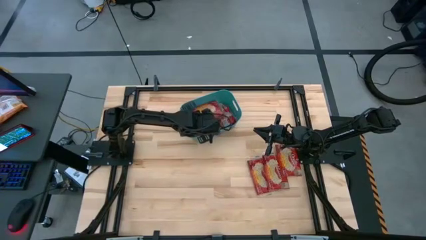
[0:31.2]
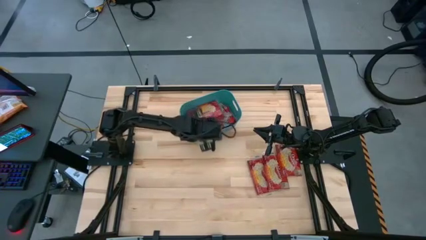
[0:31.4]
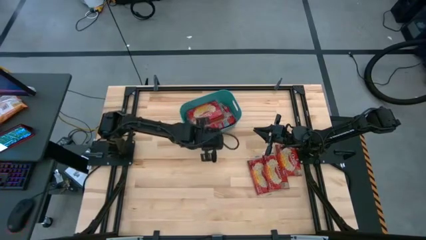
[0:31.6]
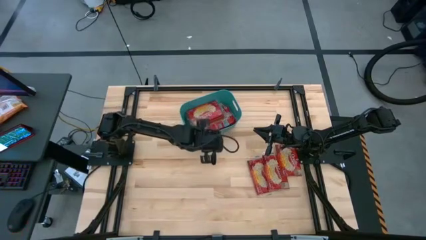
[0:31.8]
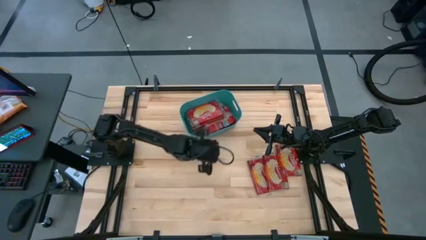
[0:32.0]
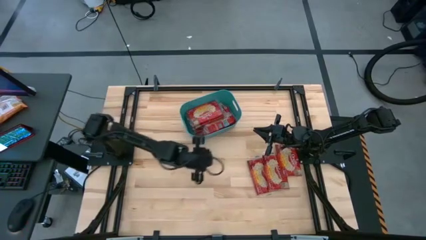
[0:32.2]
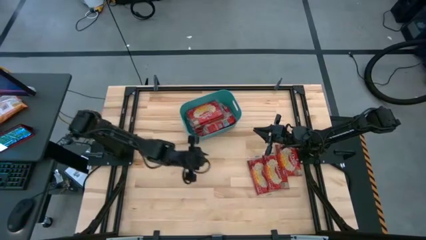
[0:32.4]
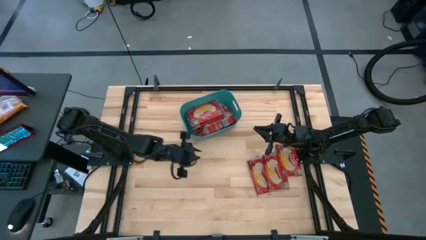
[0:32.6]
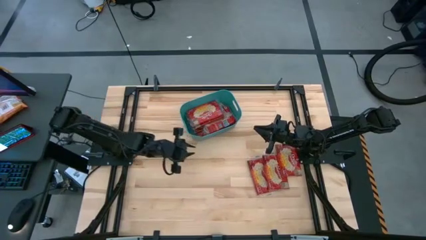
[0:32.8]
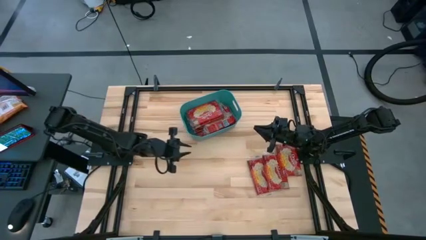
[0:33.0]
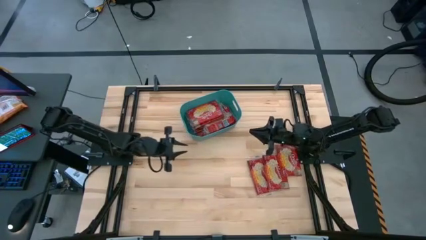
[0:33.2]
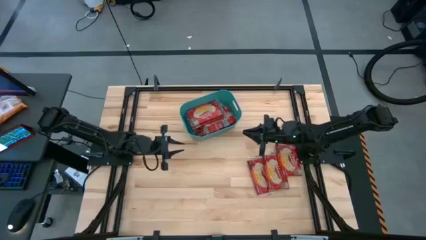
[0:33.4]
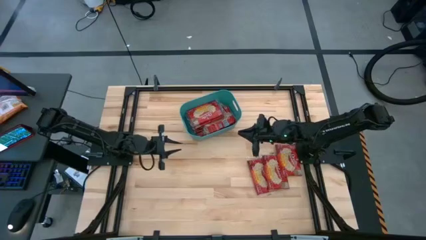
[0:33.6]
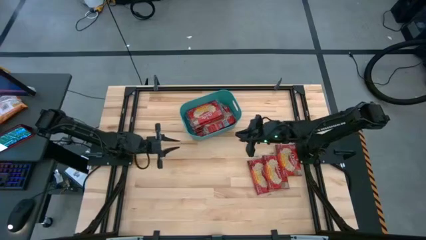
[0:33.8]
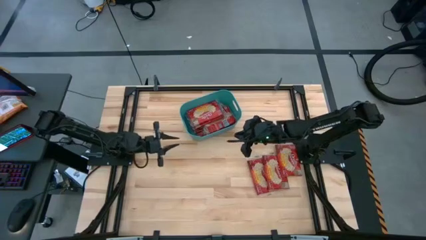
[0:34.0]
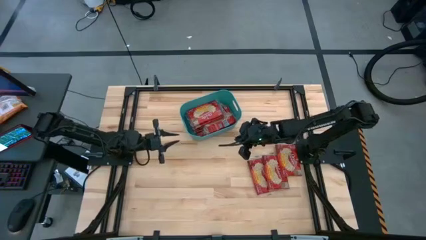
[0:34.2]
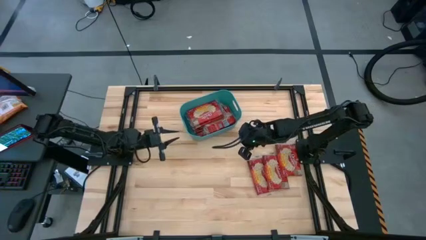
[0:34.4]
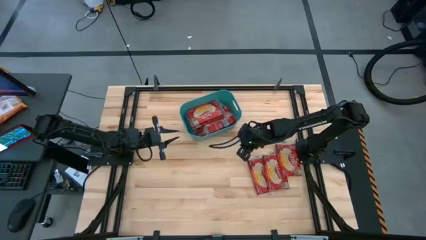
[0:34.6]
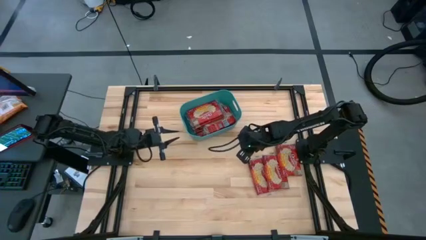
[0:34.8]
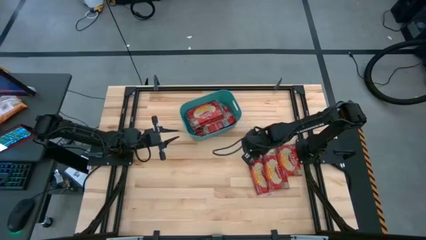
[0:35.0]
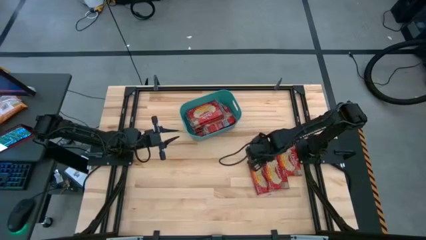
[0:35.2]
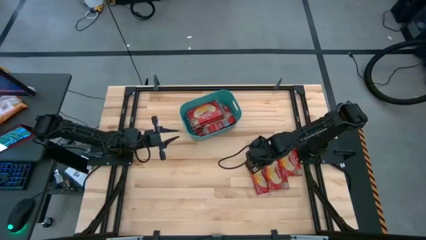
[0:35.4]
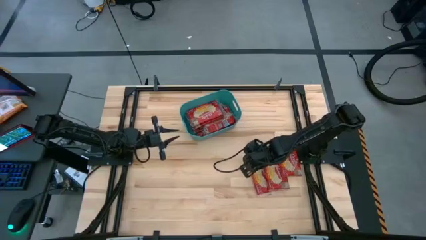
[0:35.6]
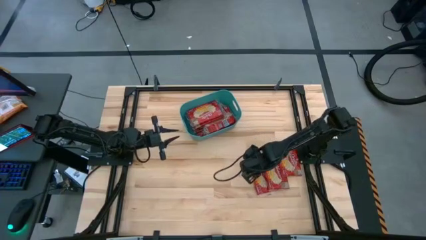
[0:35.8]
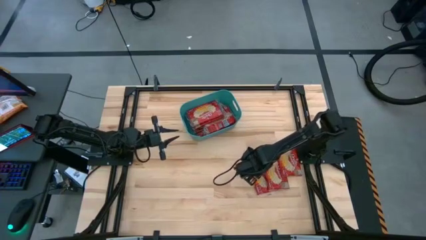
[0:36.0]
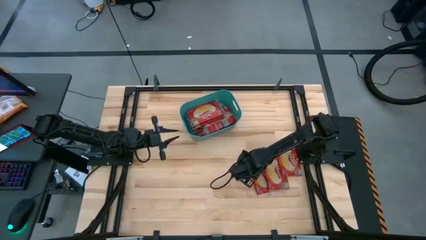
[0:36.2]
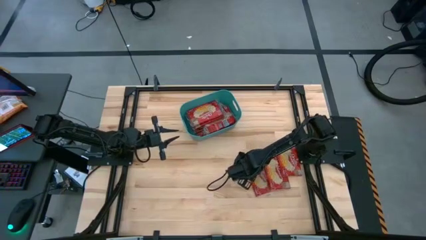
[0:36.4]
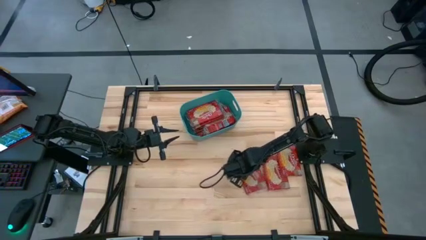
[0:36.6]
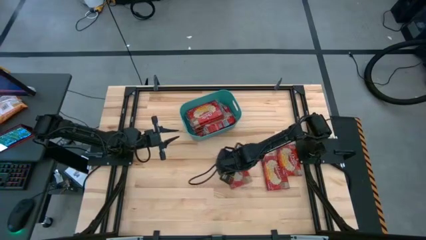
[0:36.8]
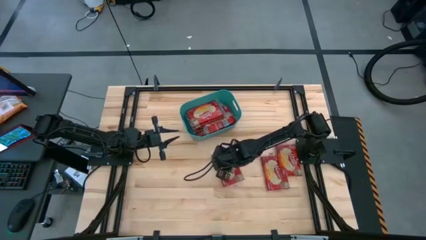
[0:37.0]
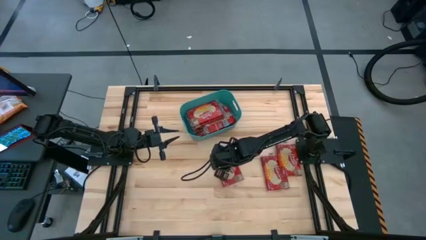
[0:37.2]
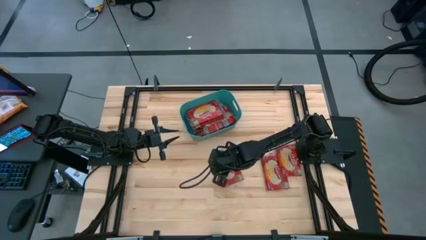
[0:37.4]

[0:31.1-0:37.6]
Task: Sort popcorn bags into baskets
Move the red popcorn bag to the center

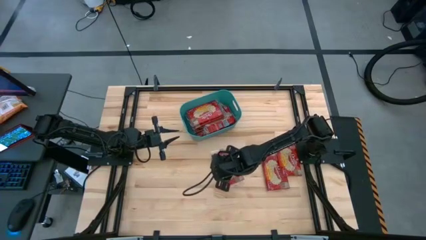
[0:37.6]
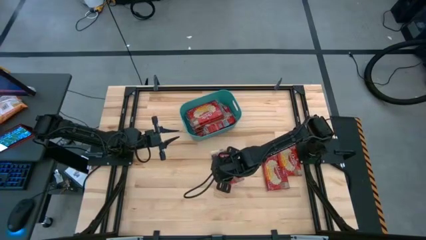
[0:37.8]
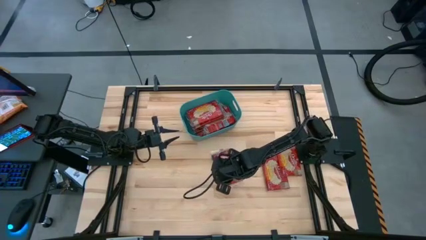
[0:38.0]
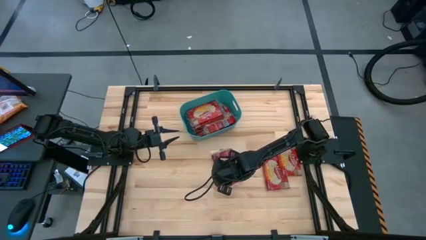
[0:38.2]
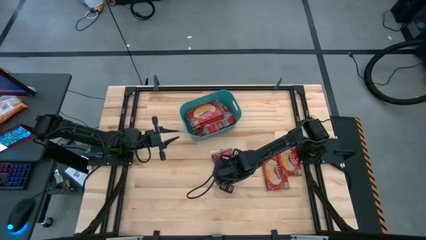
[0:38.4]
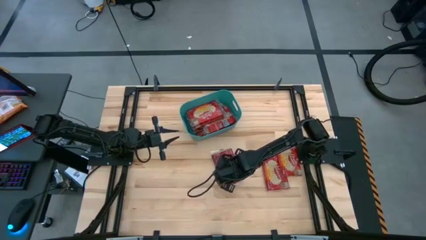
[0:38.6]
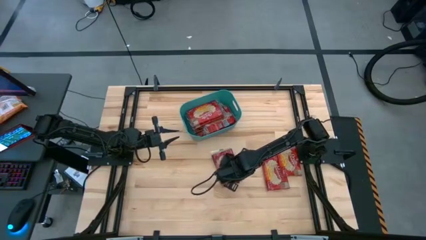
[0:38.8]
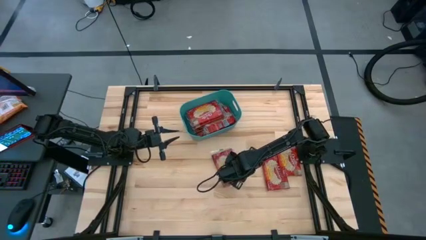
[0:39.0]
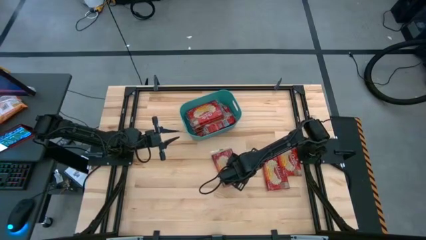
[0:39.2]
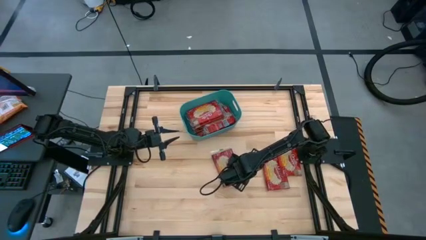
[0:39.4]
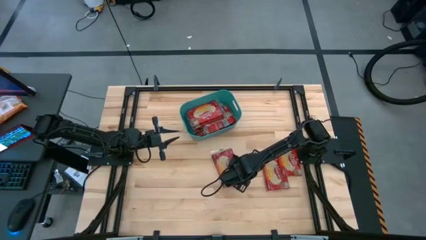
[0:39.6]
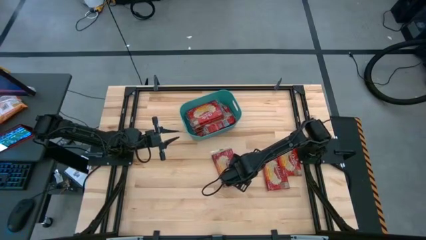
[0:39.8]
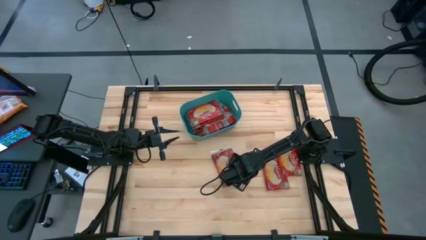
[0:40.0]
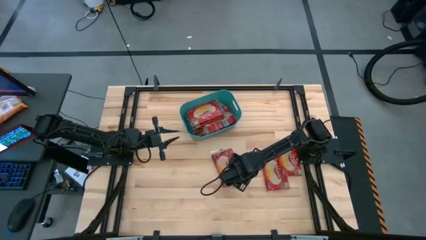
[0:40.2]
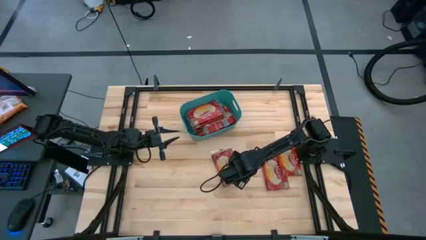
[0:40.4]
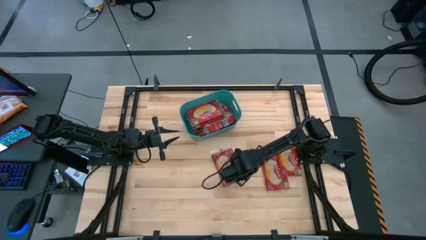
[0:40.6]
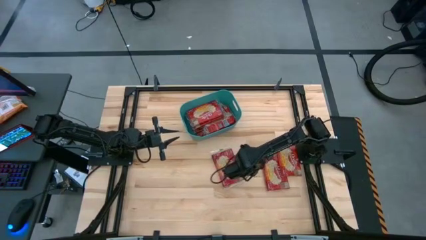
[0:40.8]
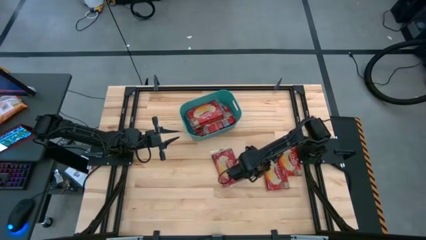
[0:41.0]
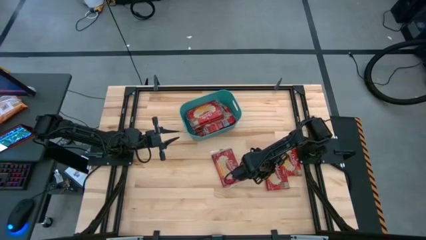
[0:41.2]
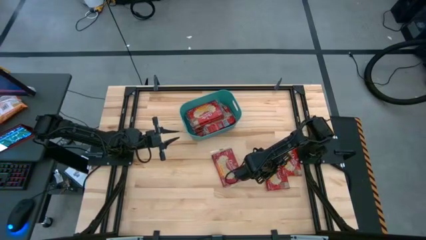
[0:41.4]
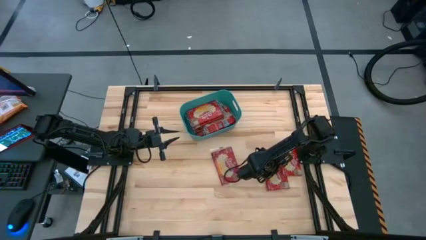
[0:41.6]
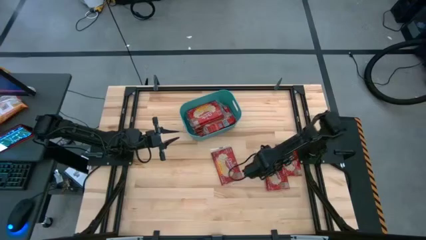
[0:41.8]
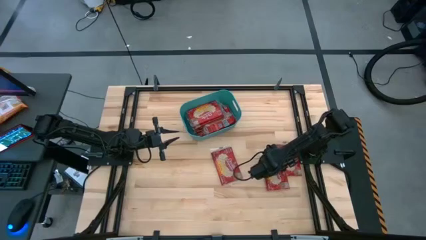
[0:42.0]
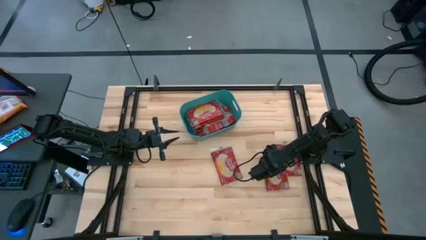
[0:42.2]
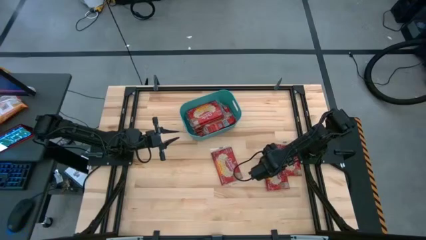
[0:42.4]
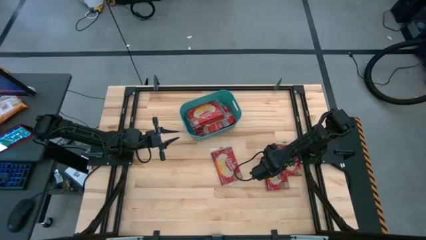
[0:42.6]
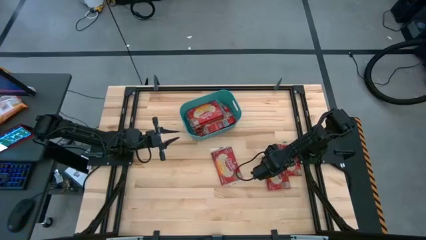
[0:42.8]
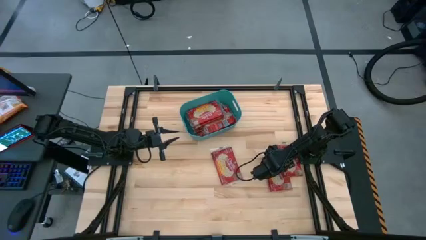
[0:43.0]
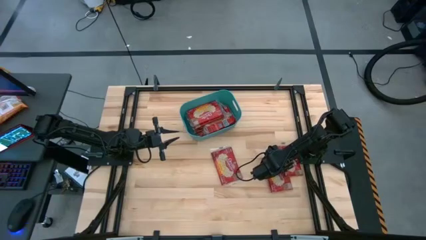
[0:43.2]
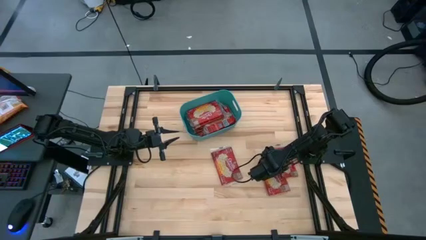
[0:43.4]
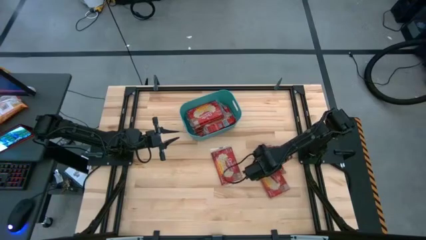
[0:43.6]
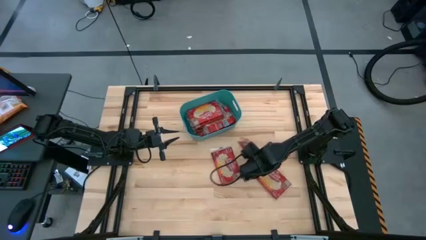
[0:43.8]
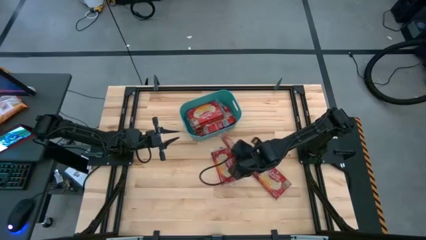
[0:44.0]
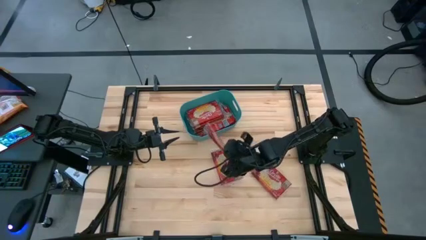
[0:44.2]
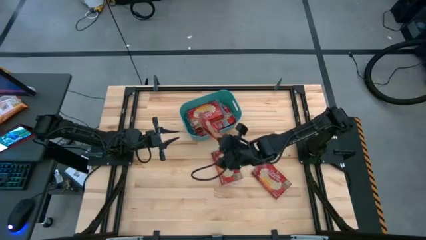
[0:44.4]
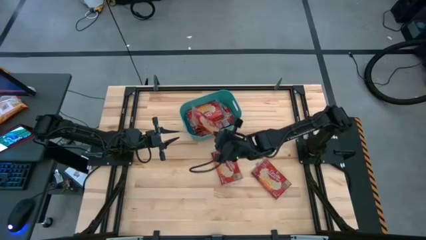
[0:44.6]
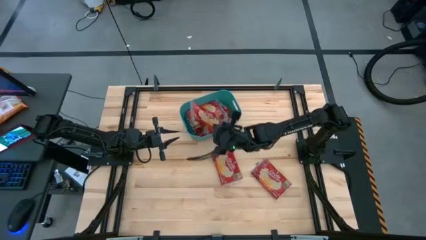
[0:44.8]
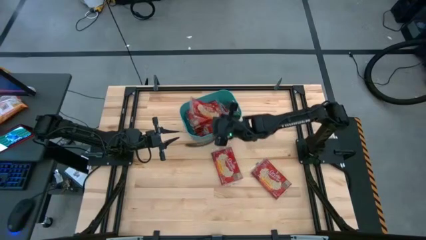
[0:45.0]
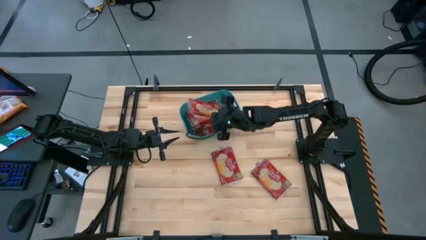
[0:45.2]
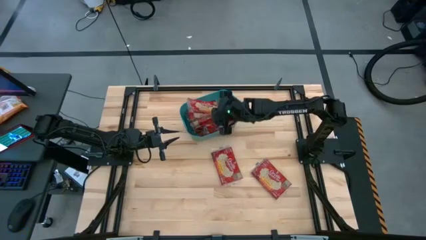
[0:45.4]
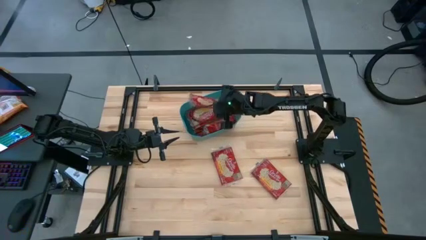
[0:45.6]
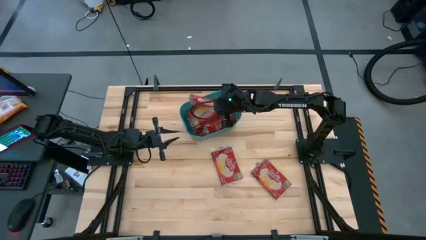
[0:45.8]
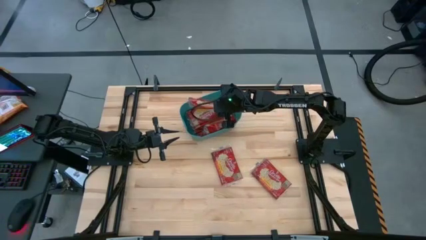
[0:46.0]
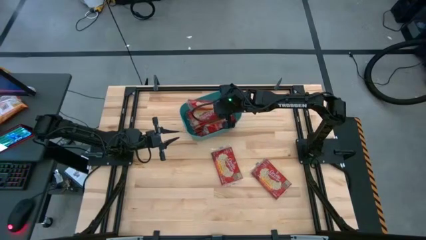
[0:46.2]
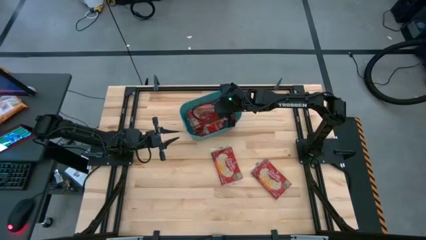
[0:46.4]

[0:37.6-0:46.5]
Put the red popcorn bag into the green bin

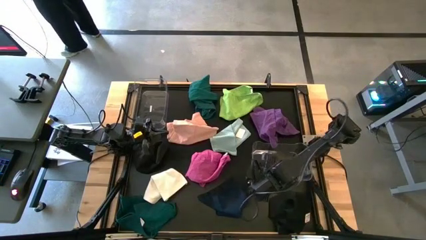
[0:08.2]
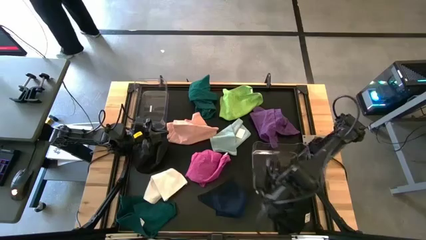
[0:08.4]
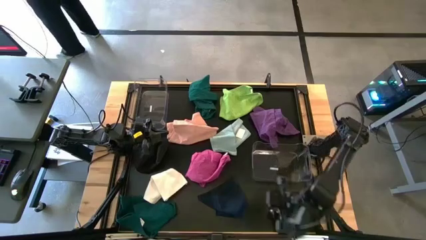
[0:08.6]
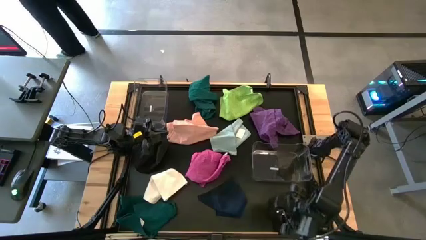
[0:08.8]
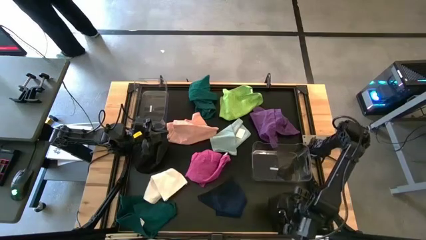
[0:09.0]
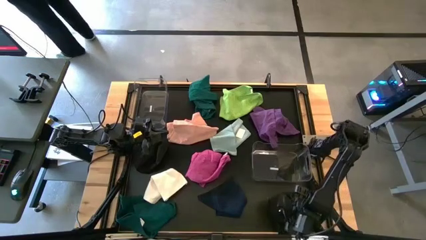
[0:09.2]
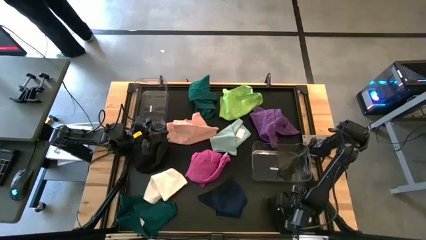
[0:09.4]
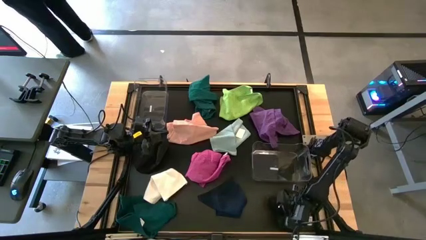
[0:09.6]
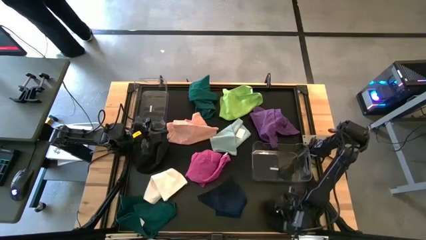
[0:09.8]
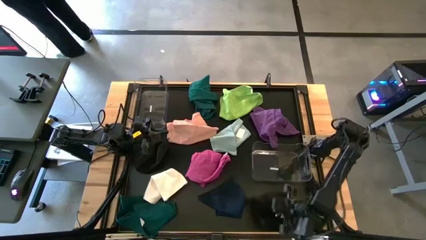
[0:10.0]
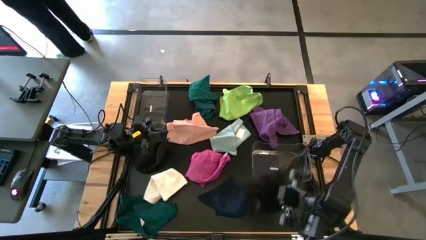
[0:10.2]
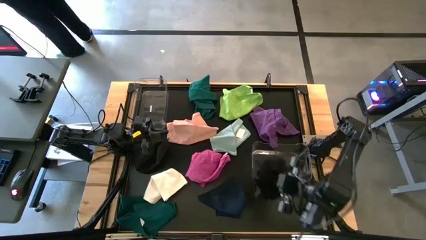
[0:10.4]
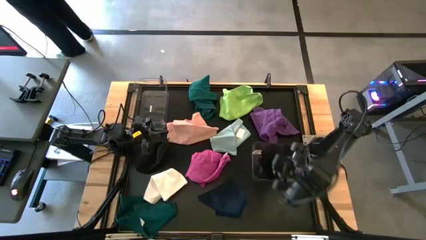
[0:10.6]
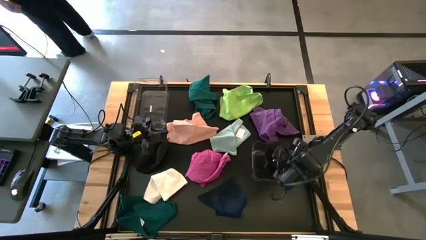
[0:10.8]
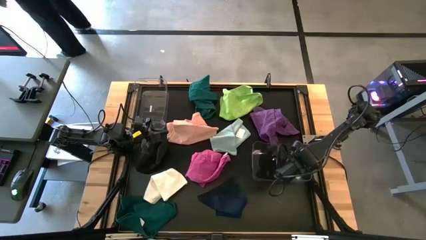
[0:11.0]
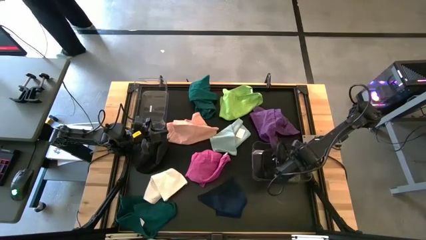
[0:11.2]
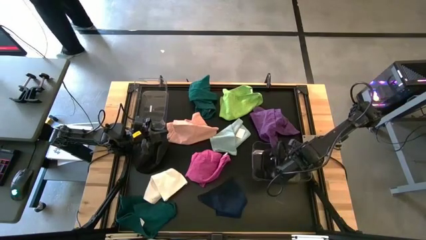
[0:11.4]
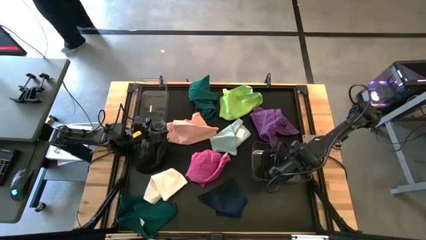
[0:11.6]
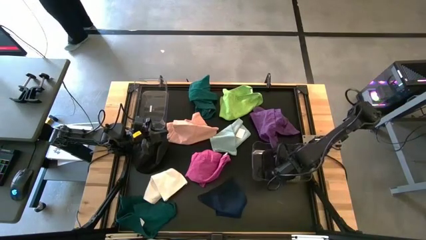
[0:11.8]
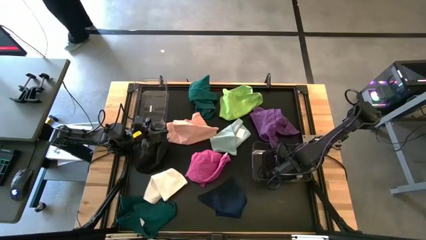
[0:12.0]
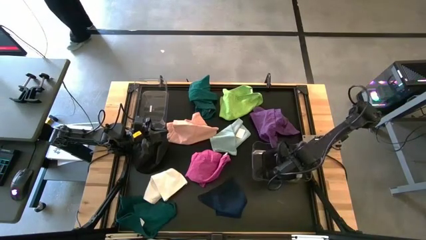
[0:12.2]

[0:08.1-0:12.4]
Task: Sort towels by color in basket
Put the right black towel into the right transparent bin
